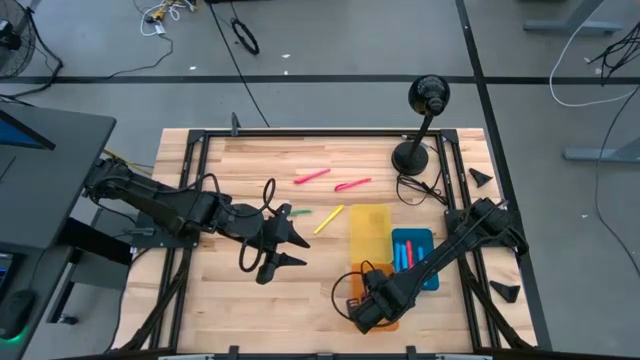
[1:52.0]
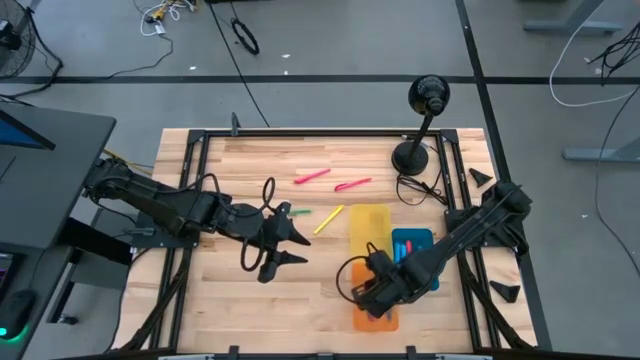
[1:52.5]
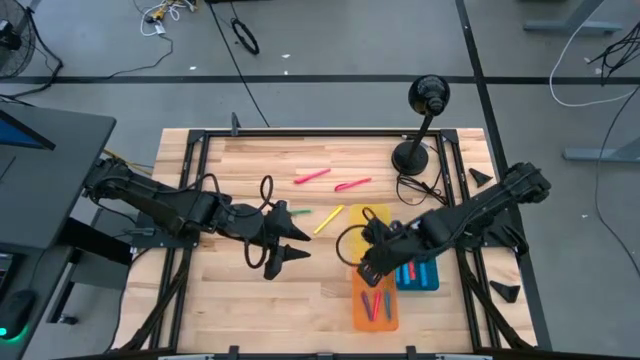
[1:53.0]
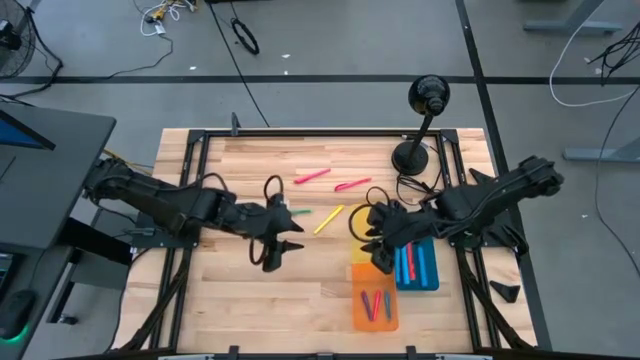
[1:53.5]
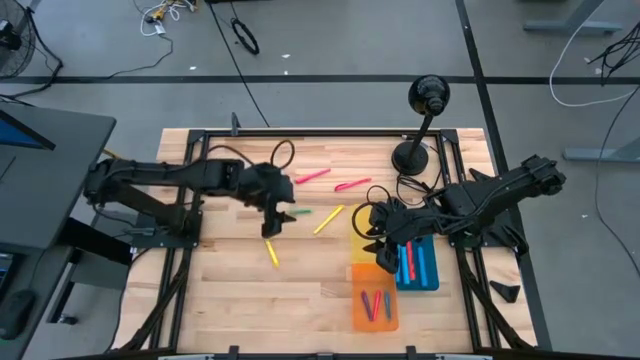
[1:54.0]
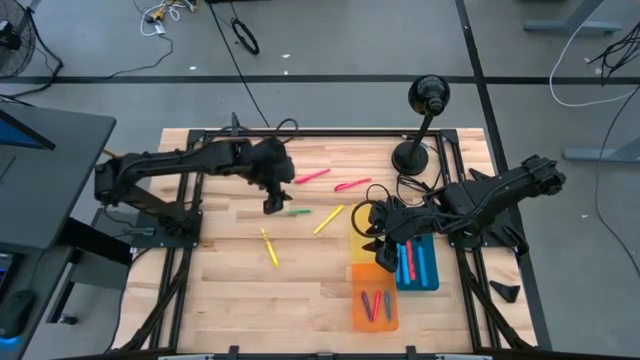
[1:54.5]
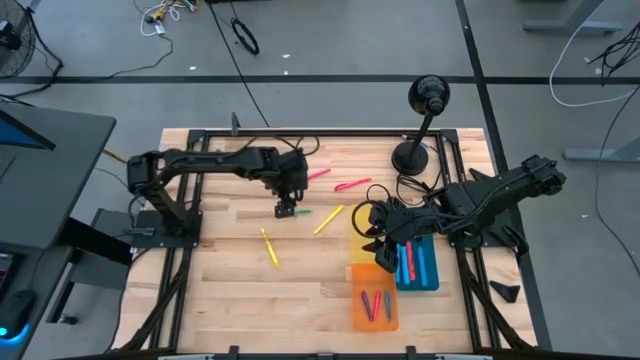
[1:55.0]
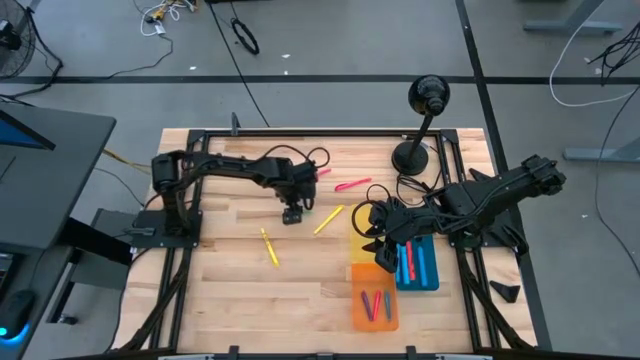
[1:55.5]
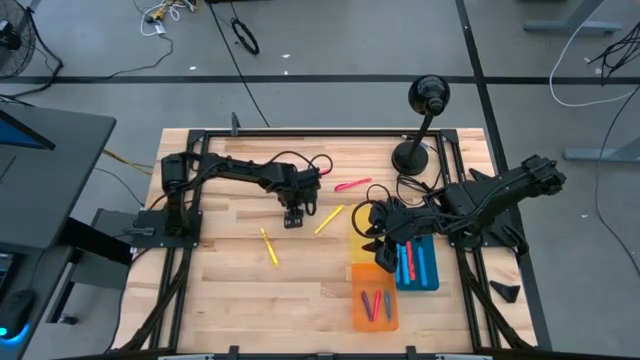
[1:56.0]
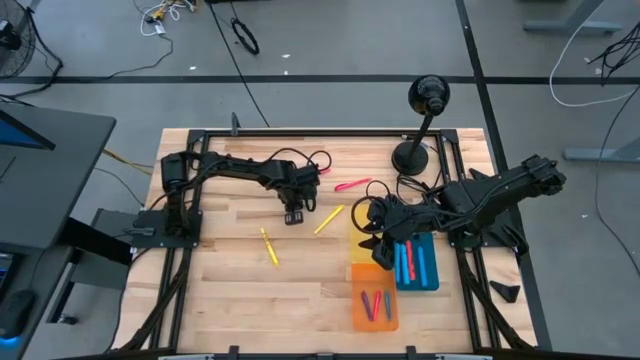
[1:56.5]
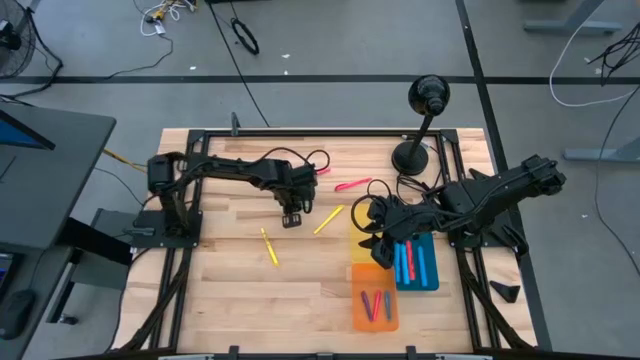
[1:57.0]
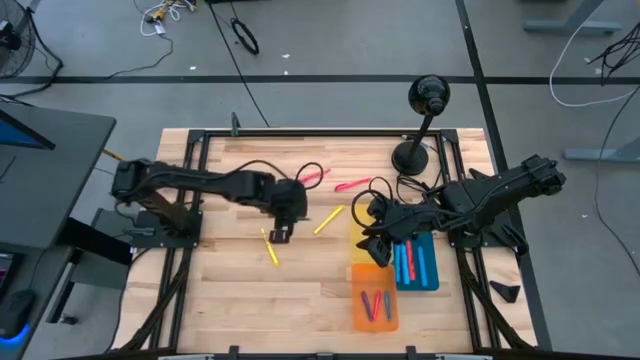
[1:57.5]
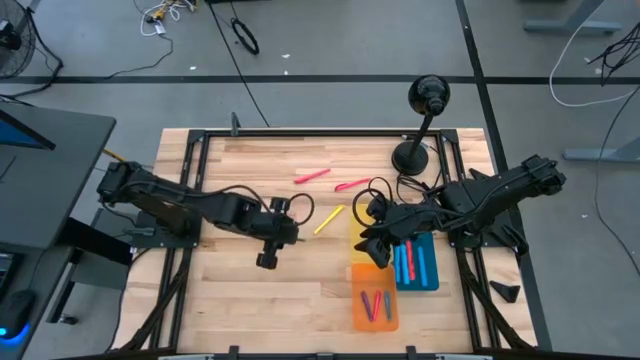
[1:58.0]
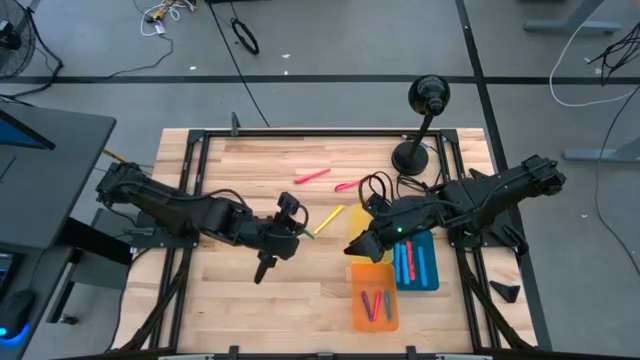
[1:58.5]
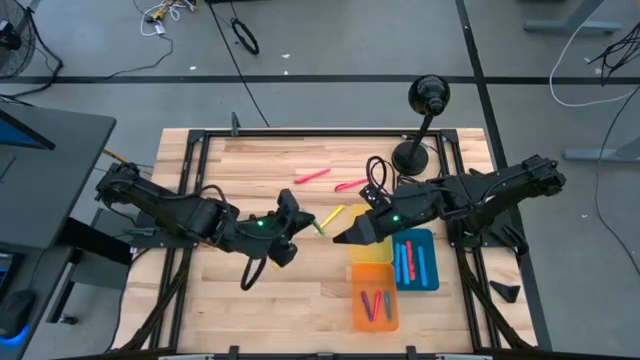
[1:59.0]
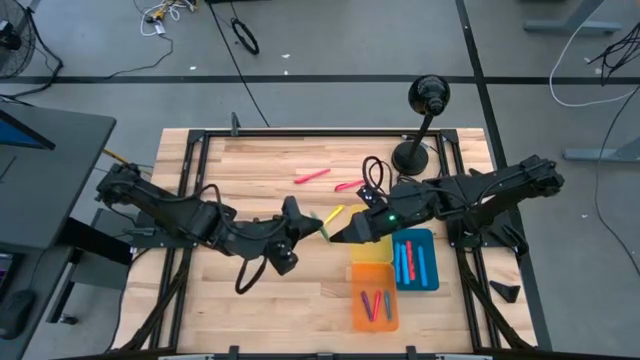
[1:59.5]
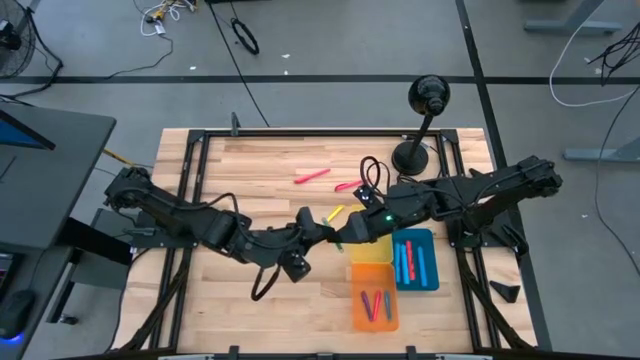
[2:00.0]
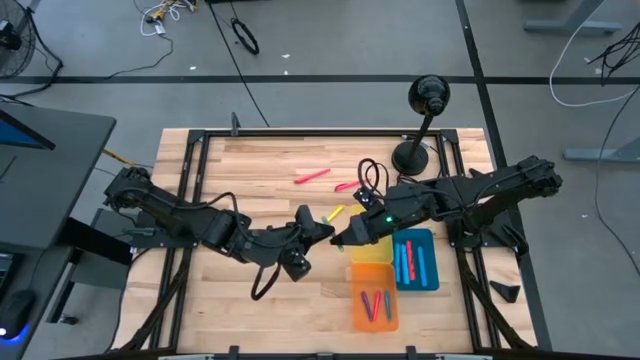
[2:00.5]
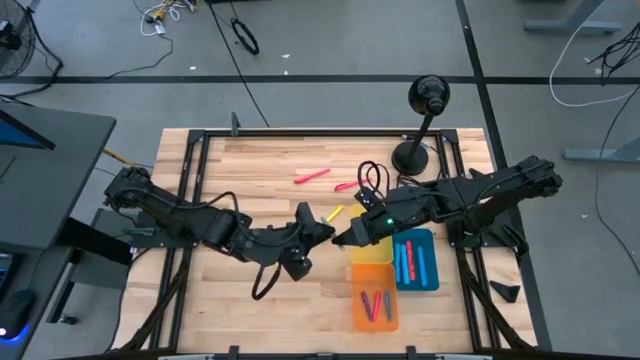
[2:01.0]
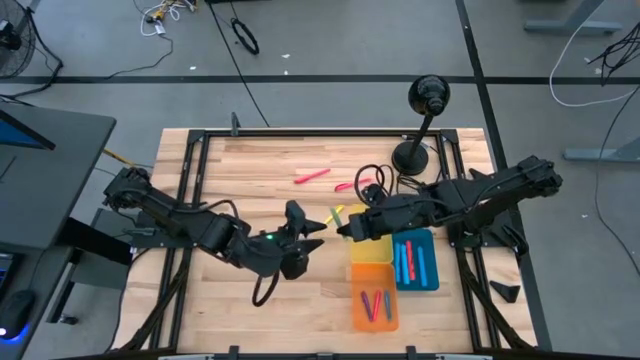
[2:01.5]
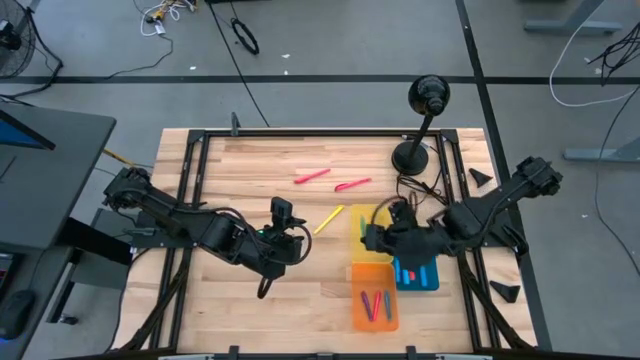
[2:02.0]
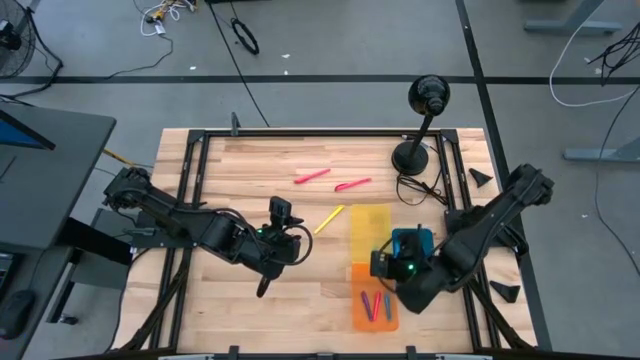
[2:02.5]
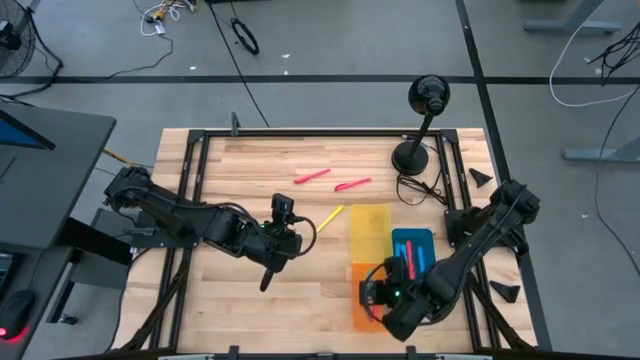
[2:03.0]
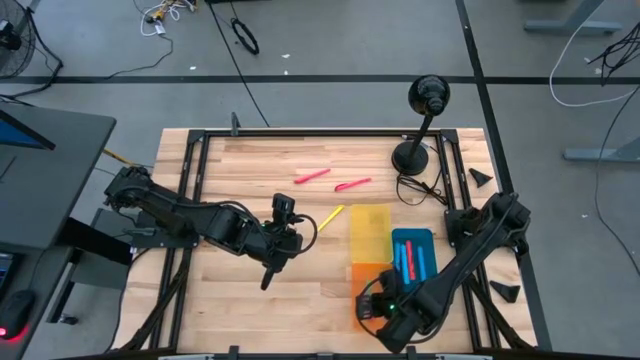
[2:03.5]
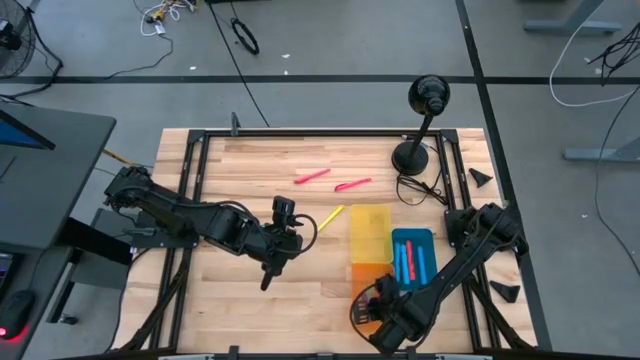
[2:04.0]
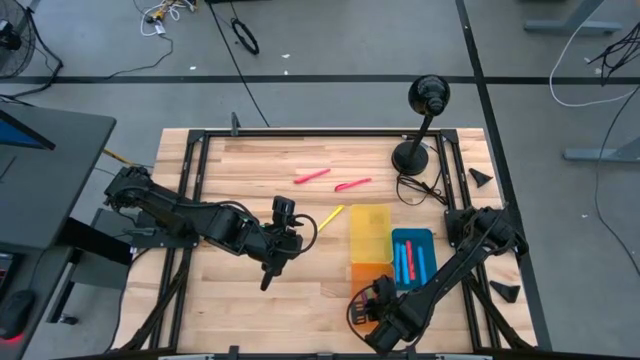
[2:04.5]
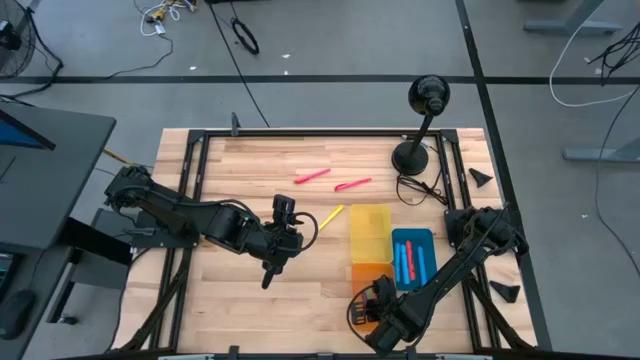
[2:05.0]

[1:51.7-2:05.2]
Task: Pick & Place Markers
Put the green pen into the orange bin

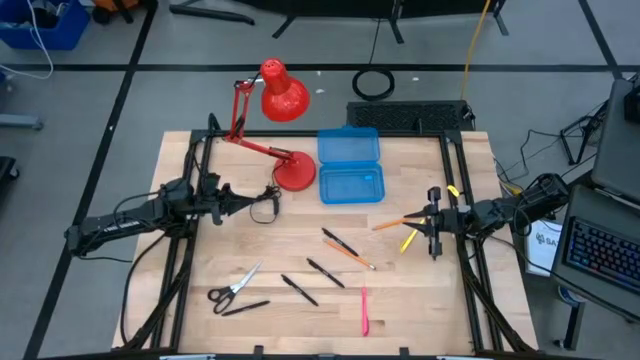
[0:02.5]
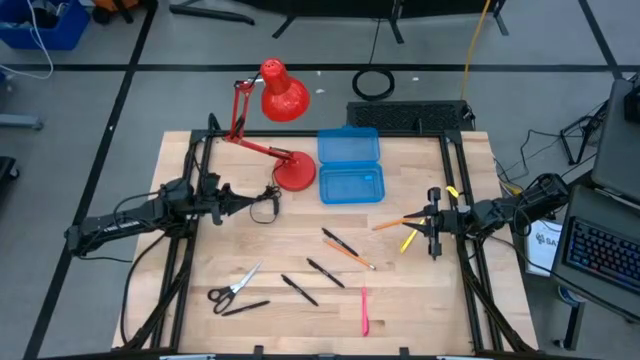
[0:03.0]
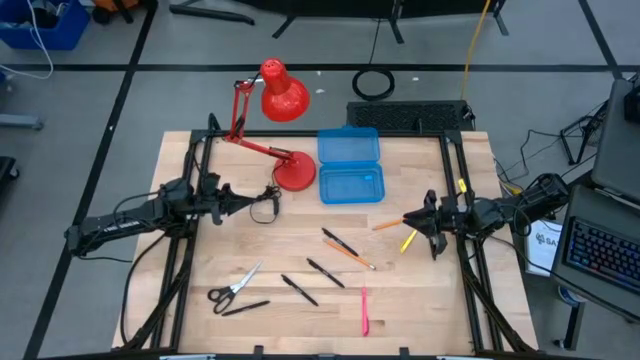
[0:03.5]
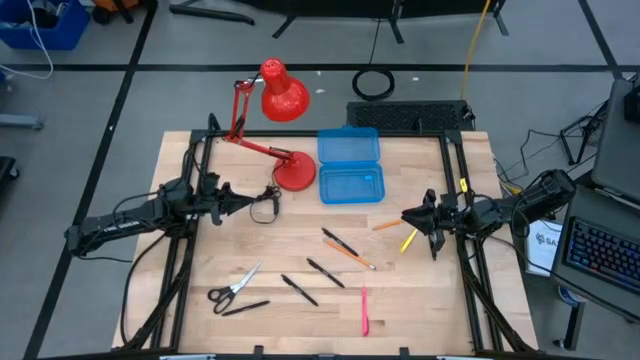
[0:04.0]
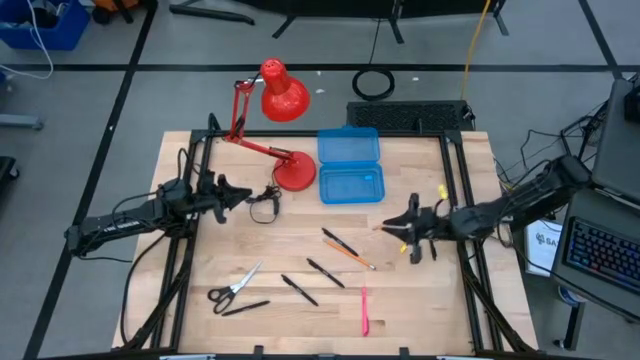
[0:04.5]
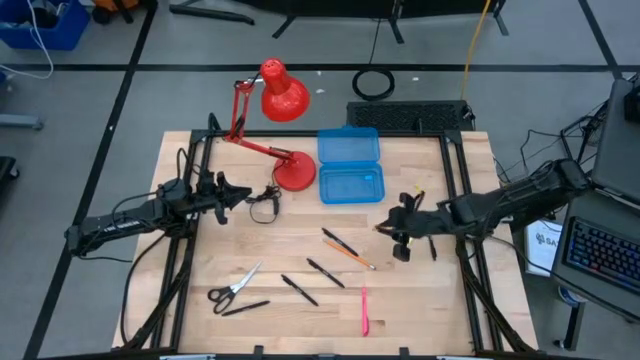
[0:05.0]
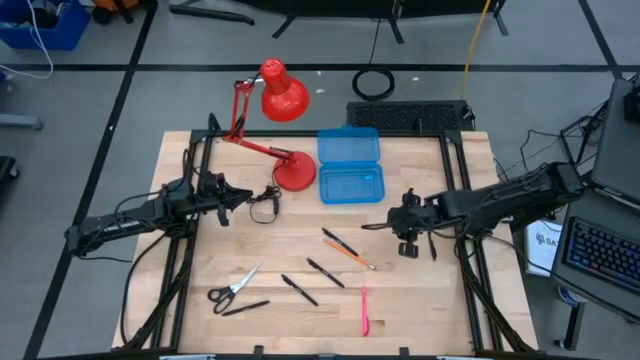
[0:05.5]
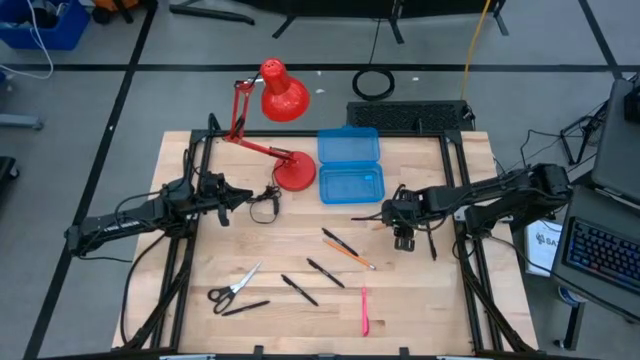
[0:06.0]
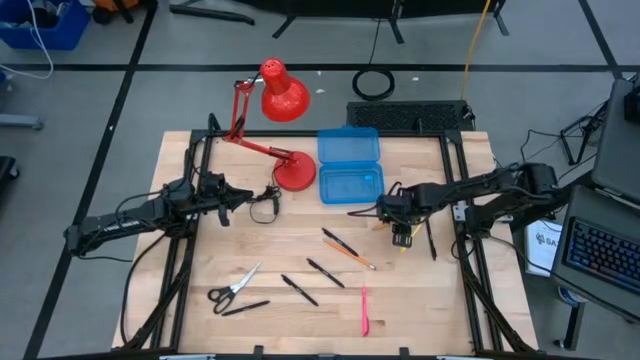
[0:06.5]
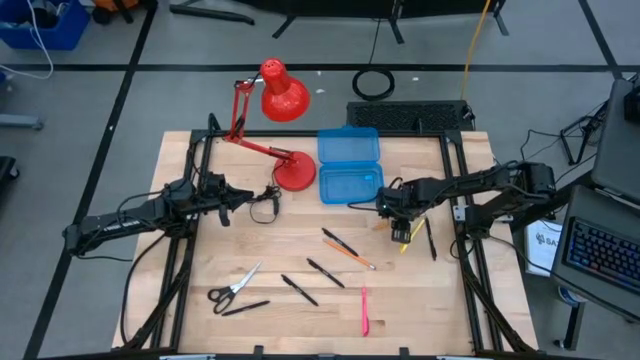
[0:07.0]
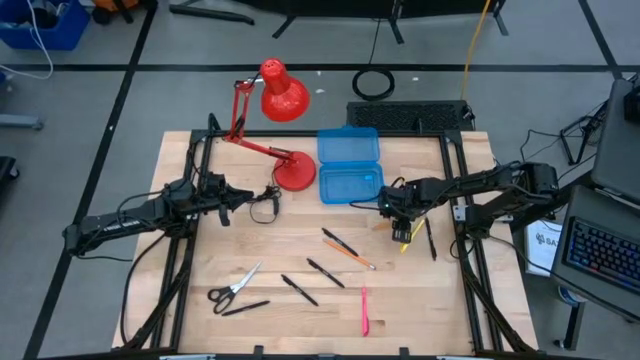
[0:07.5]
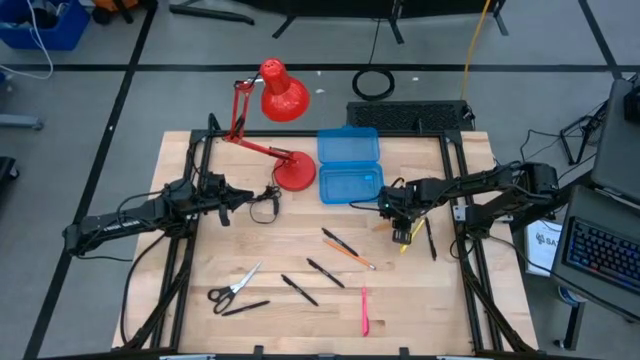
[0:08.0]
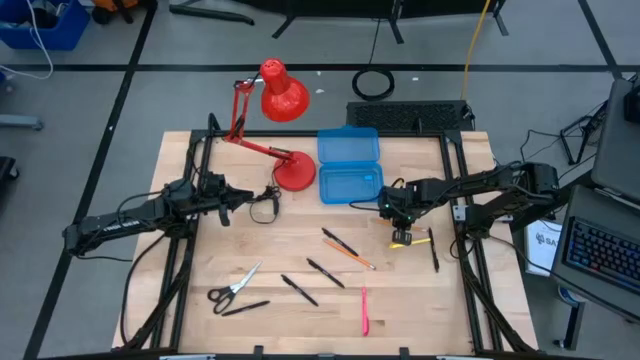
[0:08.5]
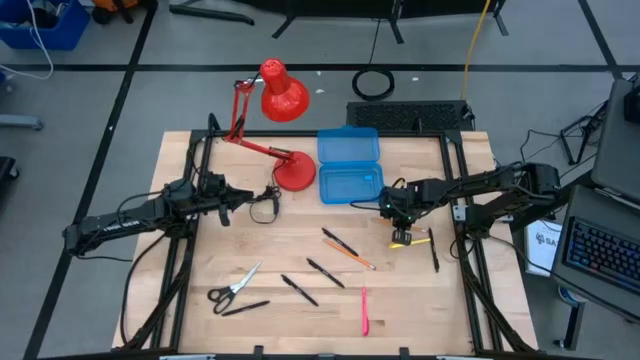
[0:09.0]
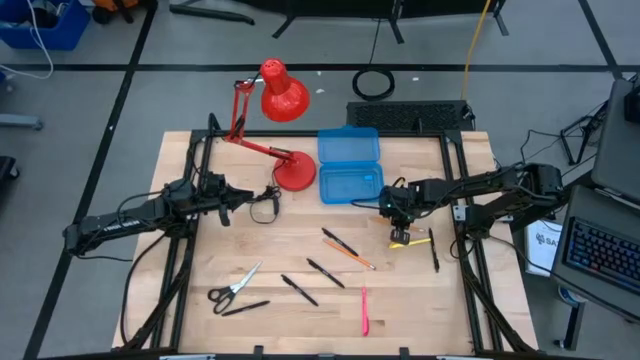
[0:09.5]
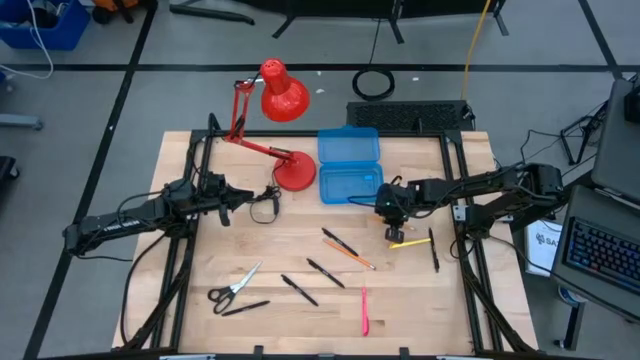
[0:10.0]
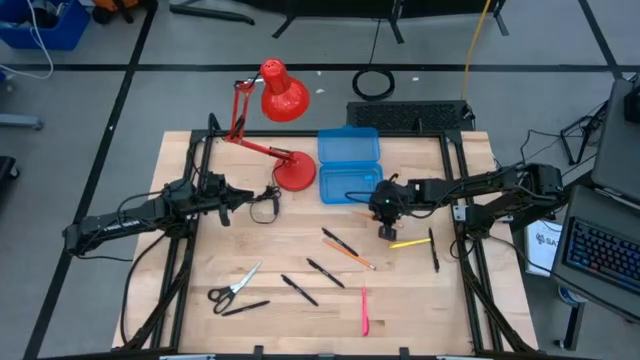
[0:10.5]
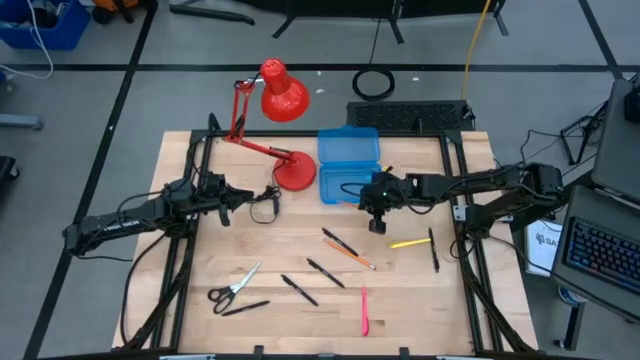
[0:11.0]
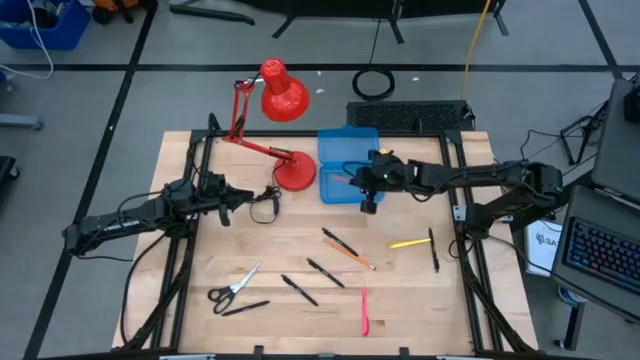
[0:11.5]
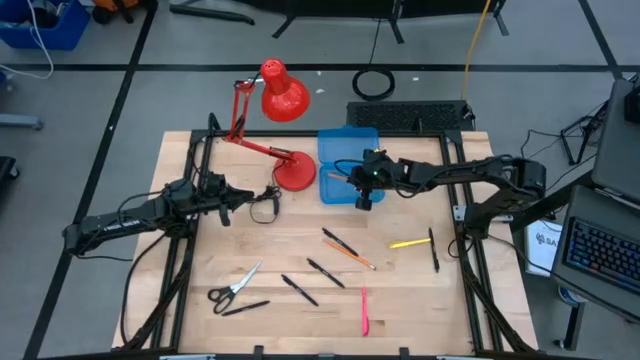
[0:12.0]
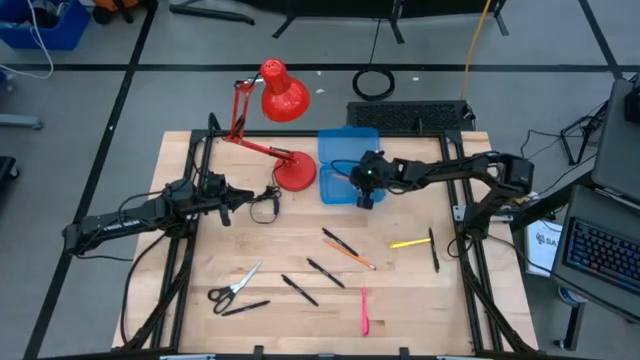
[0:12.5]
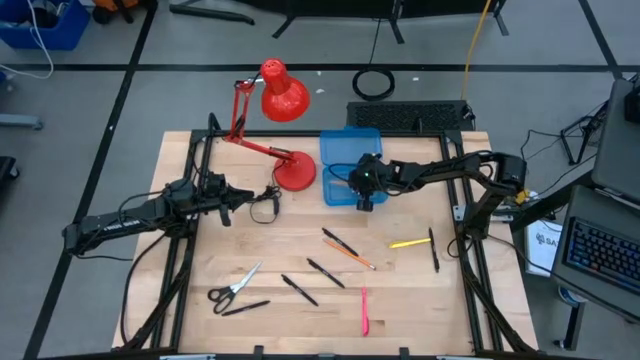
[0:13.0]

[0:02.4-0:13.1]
Task: Pick & place school supplies into a supply box
Put the orange pencil into the blue supply box
